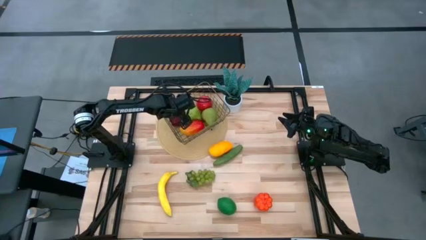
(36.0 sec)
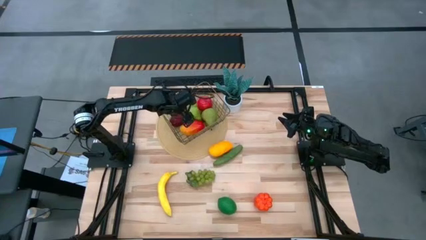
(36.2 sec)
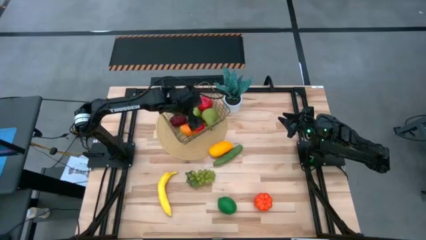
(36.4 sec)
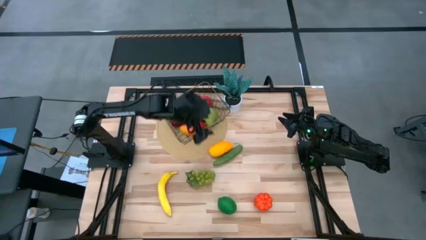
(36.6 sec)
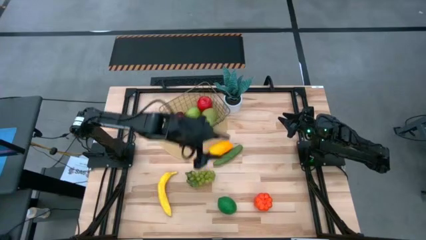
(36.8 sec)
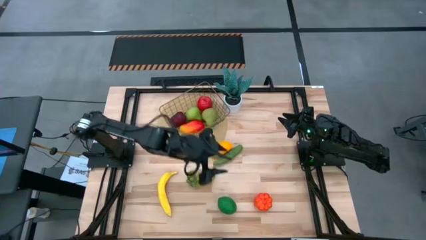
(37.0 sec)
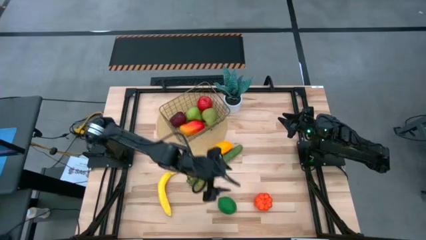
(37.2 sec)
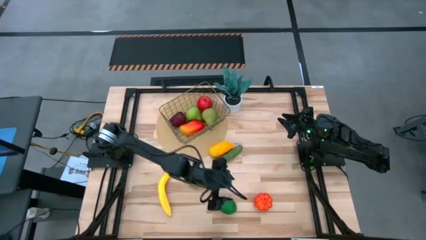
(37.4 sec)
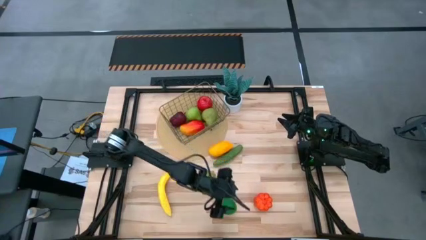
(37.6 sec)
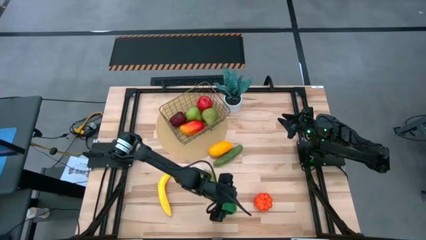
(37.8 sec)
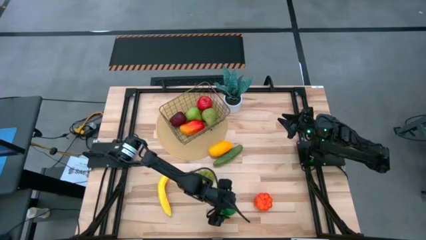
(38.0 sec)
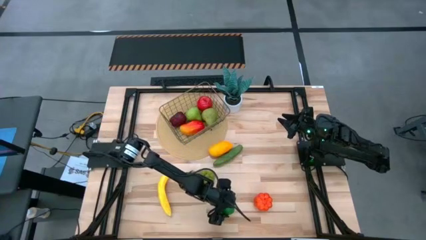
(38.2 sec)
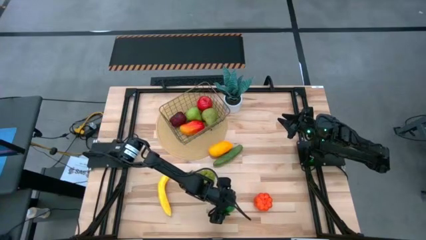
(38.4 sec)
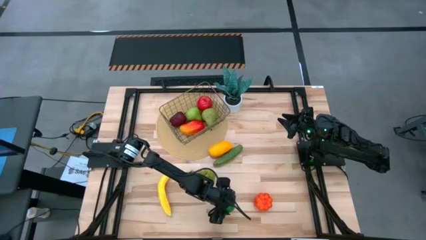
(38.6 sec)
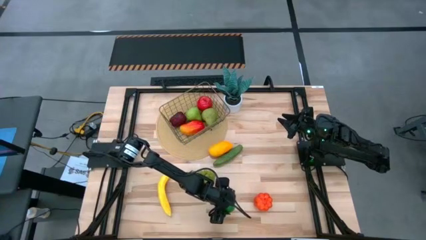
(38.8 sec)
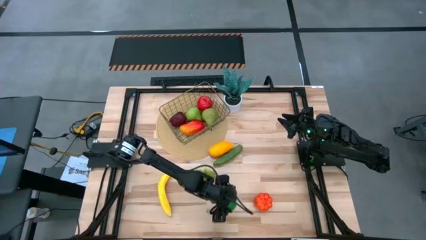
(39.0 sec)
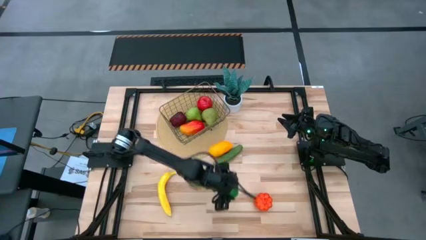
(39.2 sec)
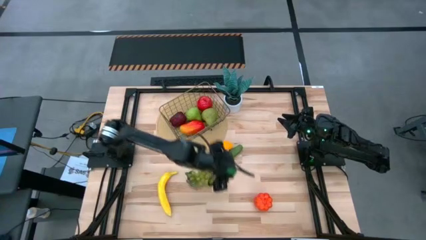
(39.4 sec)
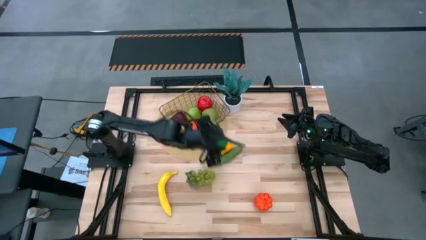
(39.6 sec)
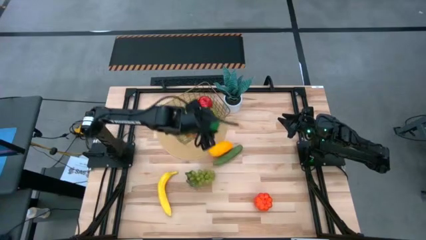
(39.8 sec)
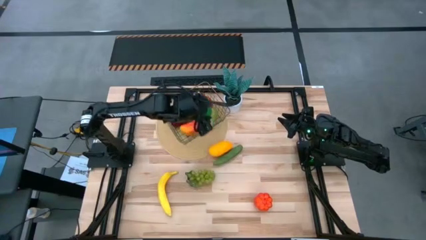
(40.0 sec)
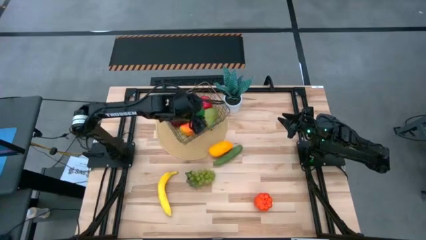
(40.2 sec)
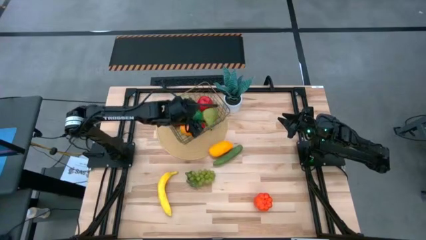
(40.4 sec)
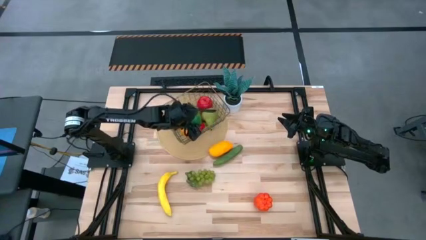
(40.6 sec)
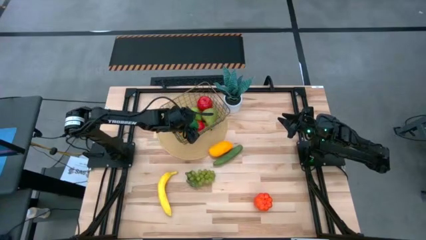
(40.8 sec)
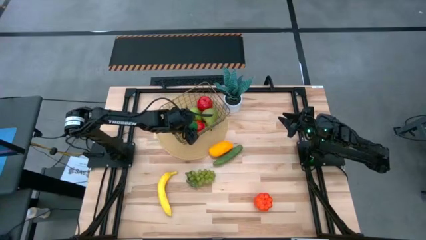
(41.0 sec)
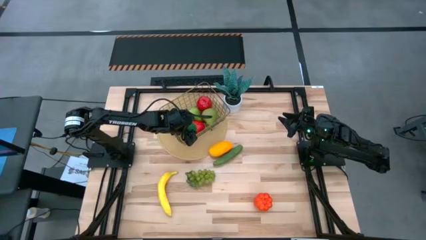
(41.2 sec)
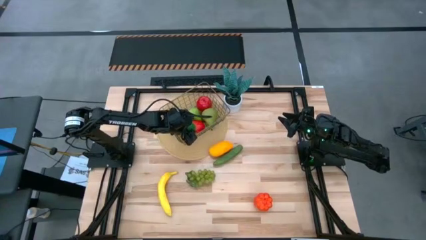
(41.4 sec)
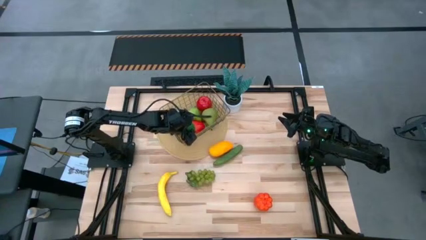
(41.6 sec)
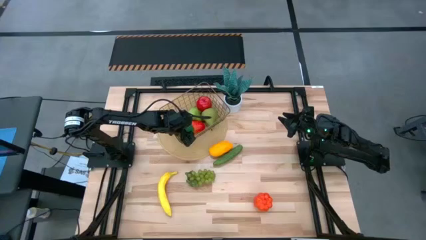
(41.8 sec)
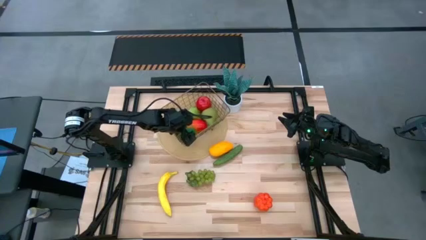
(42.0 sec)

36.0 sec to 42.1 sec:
Task: Build produce basket
Put the lime into the wire basket

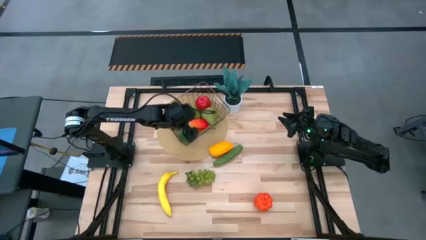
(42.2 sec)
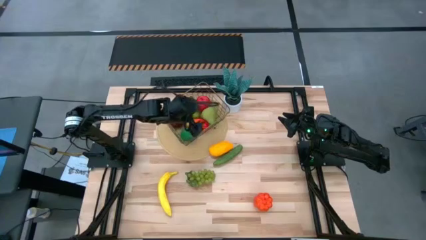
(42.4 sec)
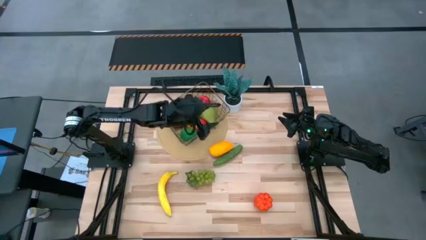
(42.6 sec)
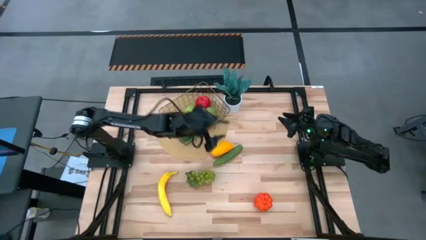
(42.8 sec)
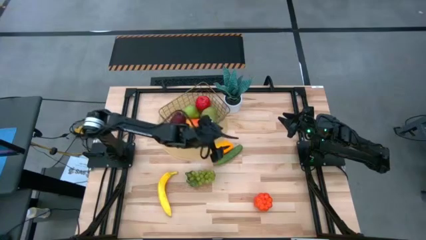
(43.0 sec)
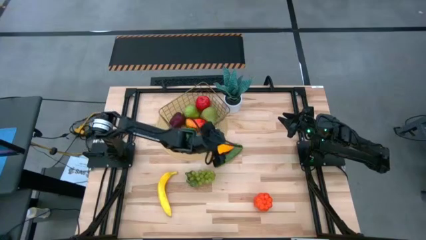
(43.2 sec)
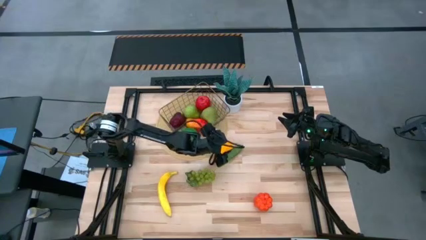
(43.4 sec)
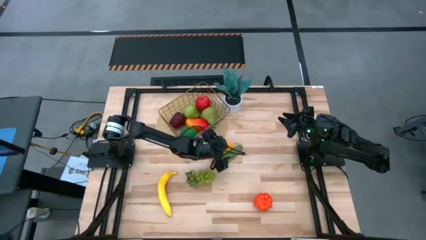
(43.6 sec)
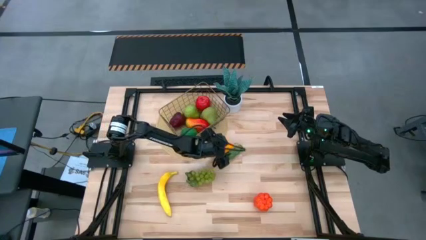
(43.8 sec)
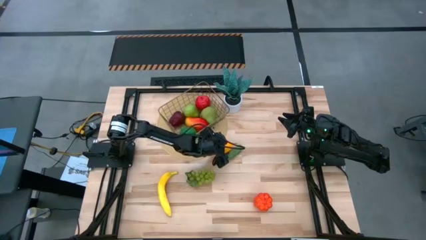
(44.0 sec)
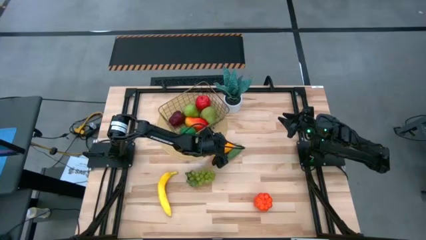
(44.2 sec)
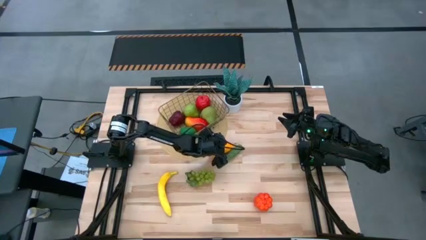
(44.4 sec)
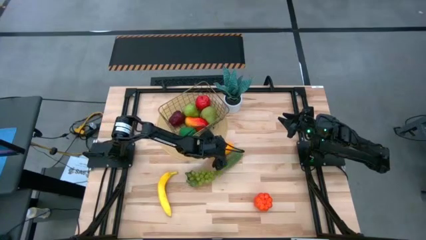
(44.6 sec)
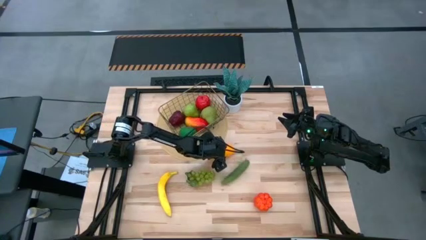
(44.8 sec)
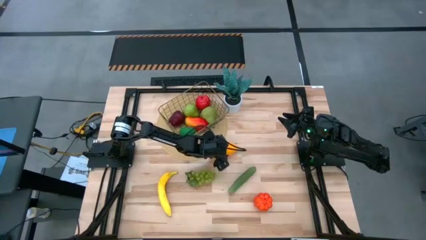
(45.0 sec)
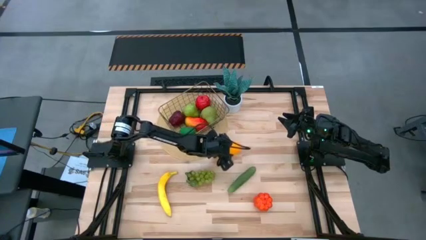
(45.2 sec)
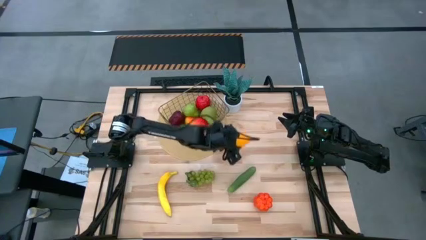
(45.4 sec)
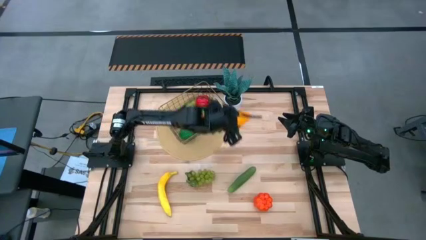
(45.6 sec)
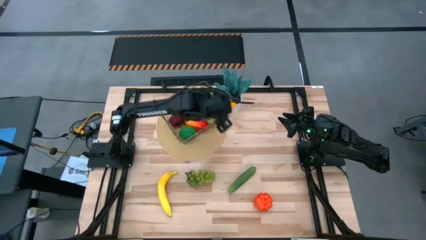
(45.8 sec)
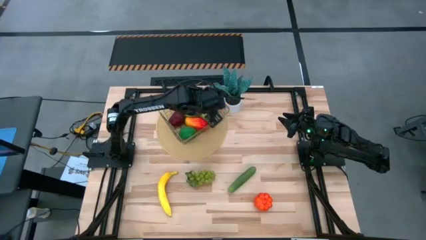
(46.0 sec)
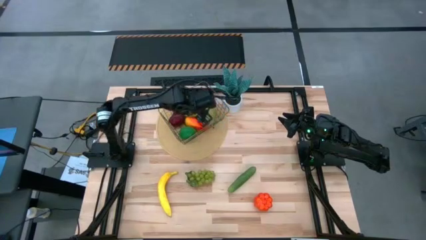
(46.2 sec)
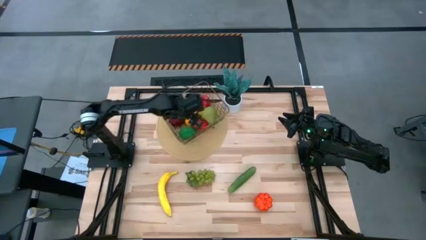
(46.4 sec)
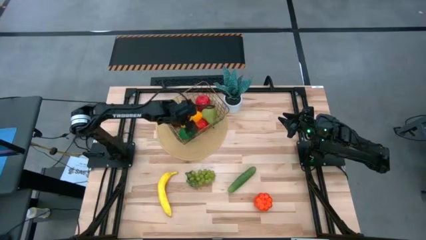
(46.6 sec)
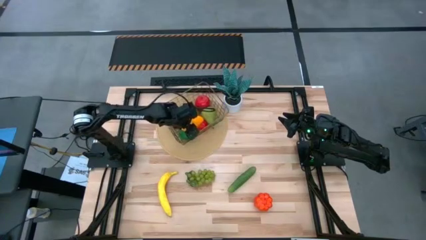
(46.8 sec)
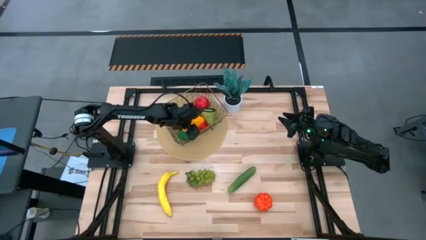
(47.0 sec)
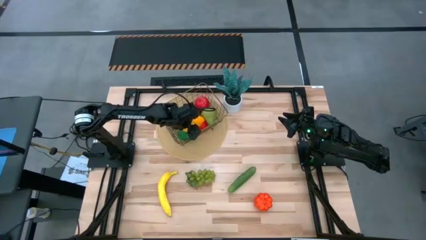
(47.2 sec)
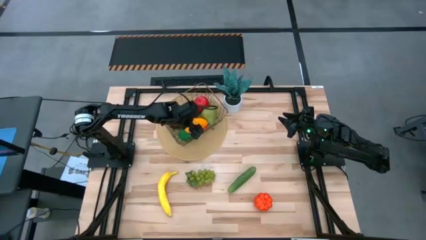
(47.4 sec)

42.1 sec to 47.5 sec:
Put the yellow mango into the wire basket

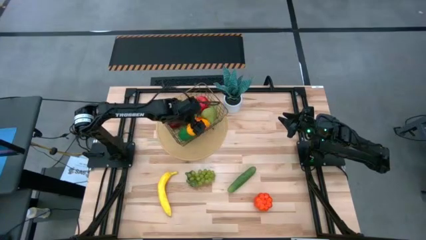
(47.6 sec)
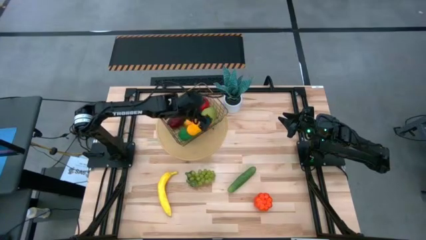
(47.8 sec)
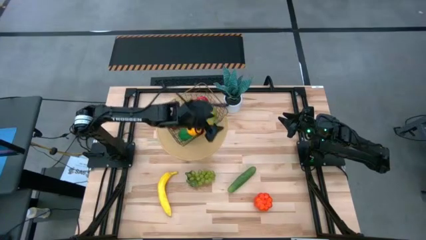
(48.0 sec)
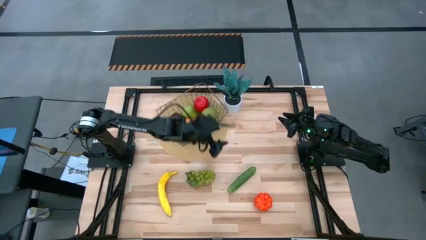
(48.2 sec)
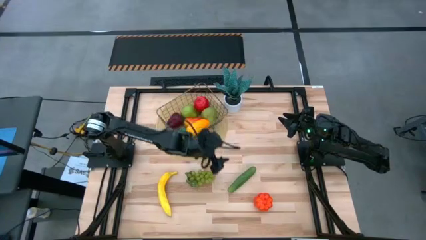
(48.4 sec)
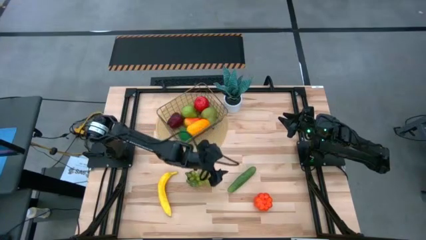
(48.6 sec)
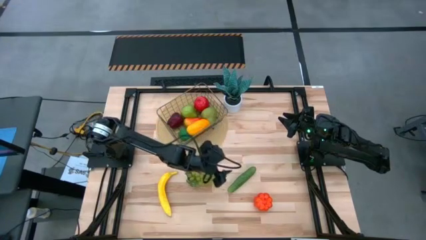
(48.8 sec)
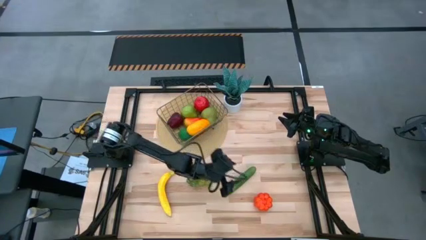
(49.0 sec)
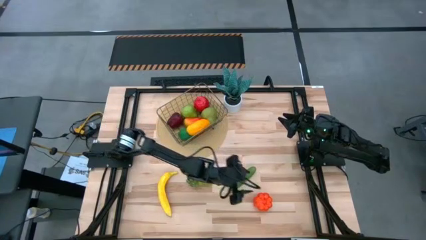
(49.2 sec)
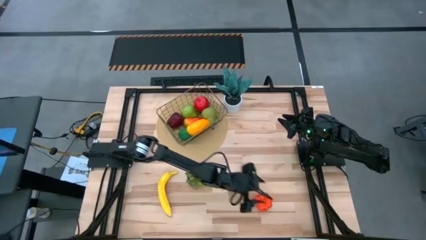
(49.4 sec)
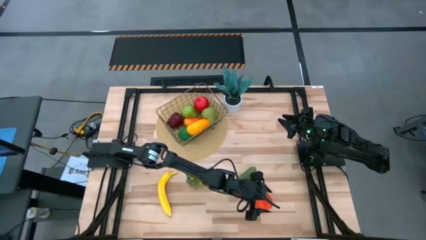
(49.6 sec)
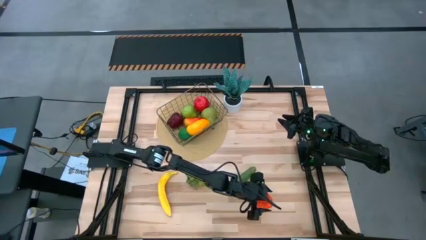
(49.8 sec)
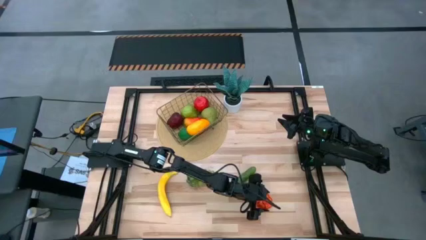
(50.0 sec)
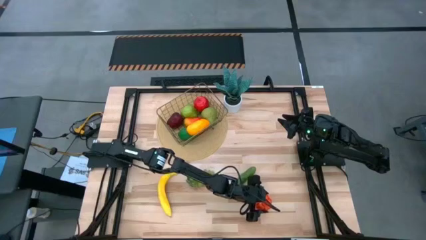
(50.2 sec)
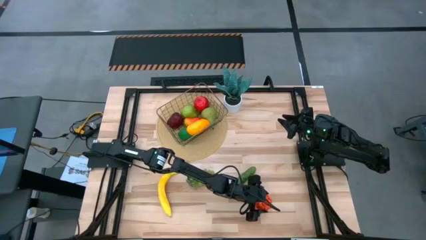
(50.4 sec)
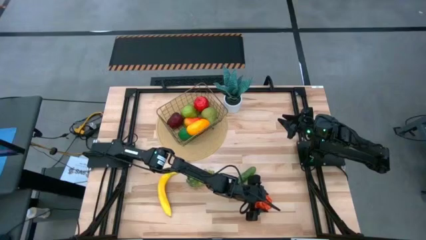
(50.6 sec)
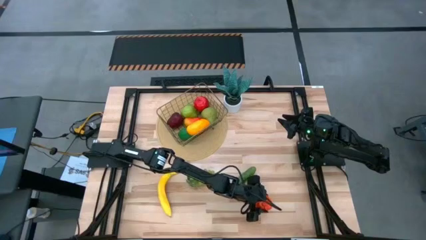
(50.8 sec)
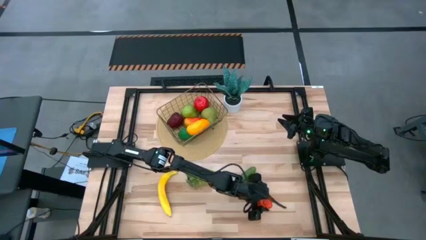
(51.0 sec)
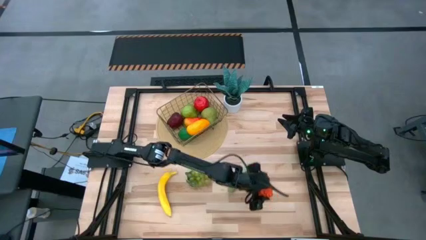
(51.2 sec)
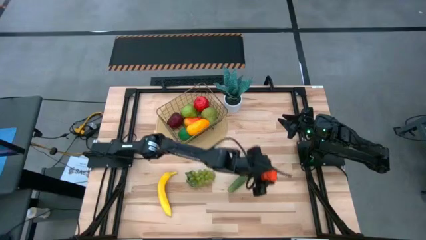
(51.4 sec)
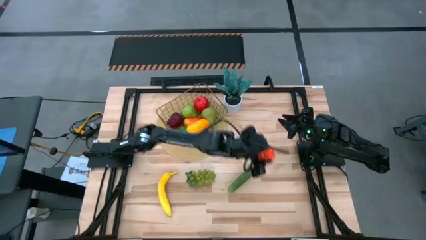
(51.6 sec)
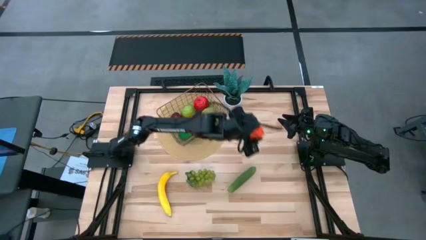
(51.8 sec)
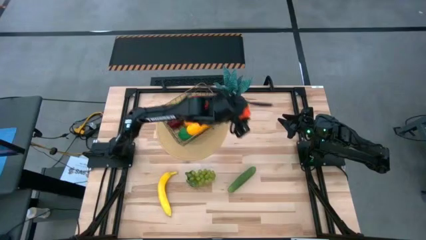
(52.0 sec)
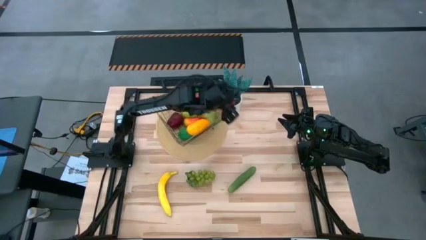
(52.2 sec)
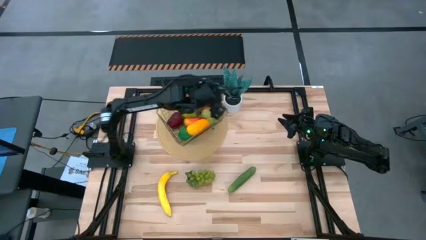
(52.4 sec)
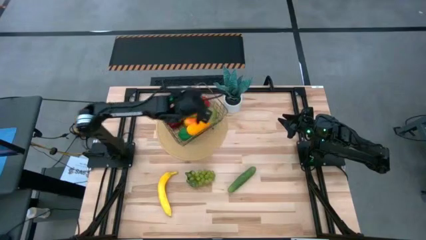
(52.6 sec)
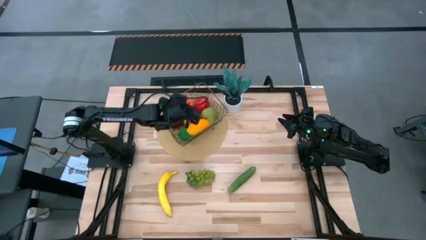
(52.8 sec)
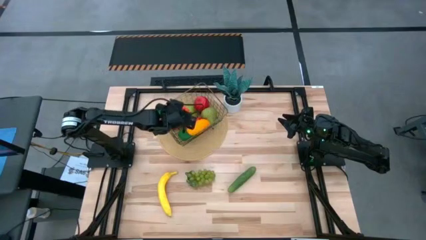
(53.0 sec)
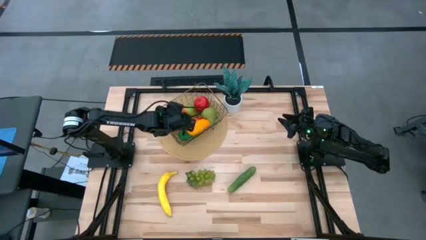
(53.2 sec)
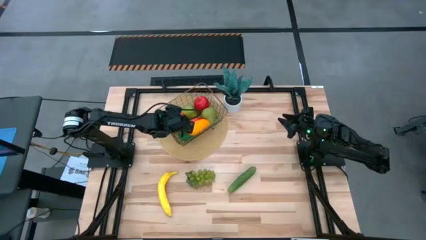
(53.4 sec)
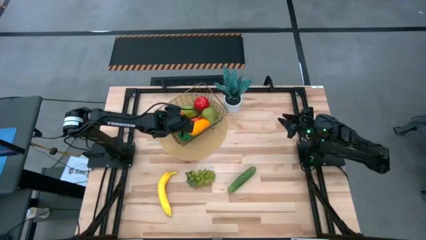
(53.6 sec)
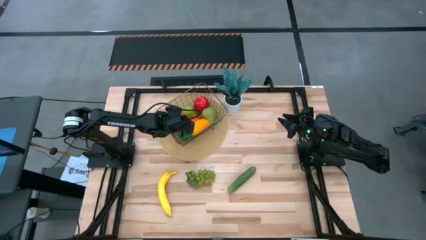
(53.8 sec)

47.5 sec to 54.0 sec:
Put the pumpkin into the wire basket
